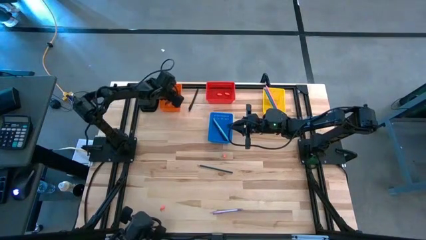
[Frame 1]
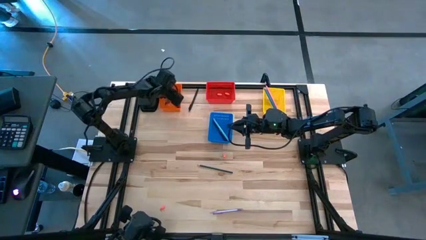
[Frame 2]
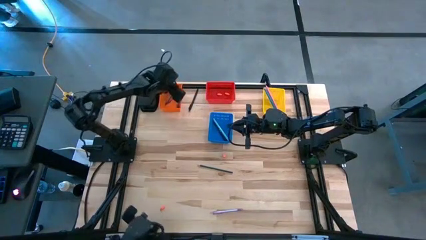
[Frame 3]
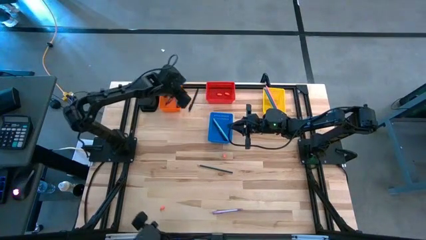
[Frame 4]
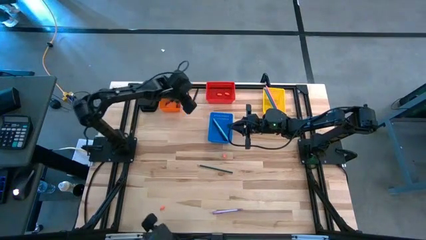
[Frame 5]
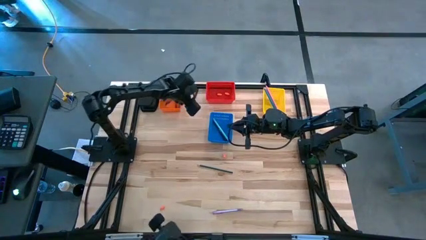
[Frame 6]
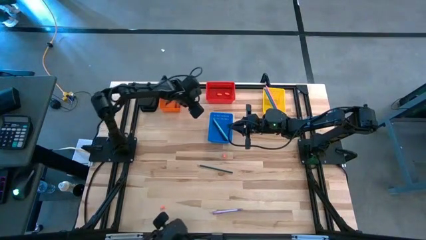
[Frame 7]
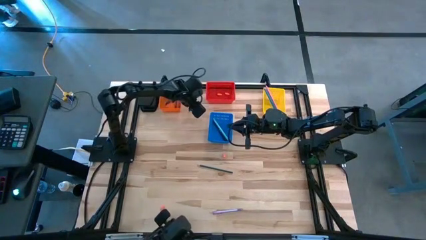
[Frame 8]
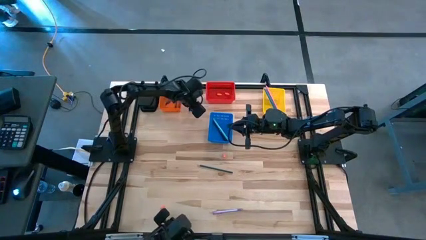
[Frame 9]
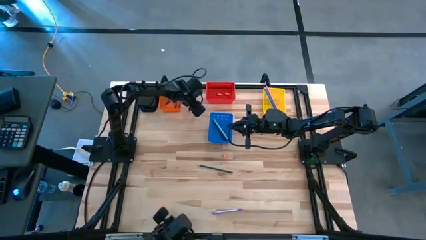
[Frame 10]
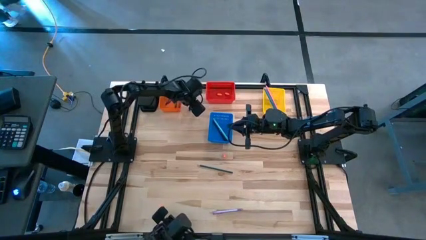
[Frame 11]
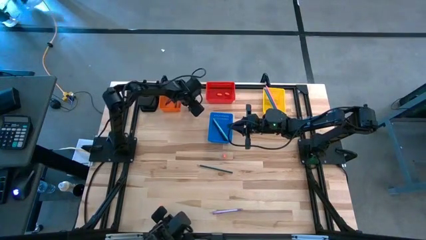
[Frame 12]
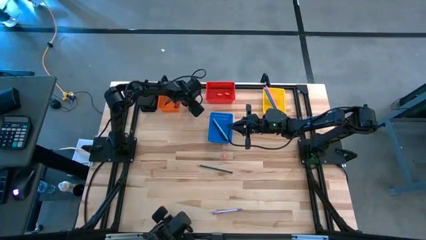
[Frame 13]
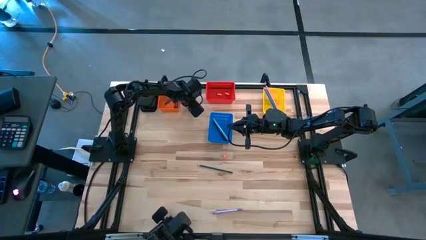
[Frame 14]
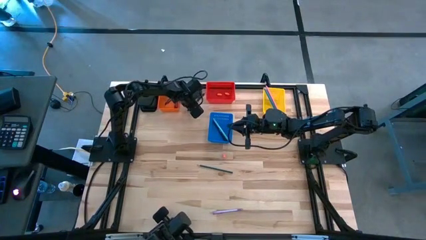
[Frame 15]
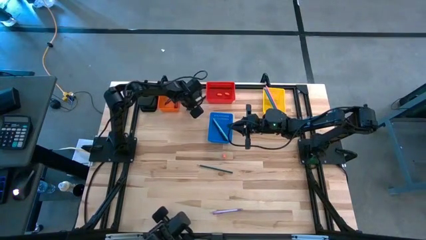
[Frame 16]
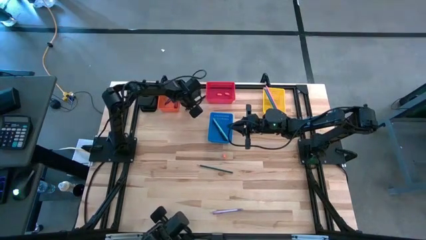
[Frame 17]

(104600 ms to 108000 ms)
Task: Sort crayons/erasers/pens/pencils in bins
Put the black pen into the blue bin

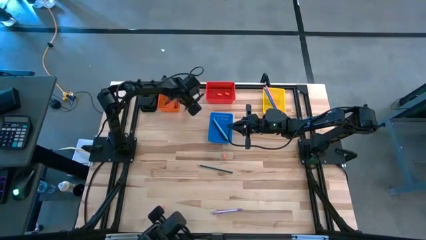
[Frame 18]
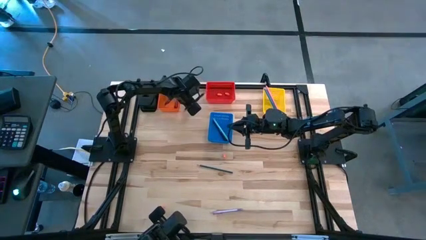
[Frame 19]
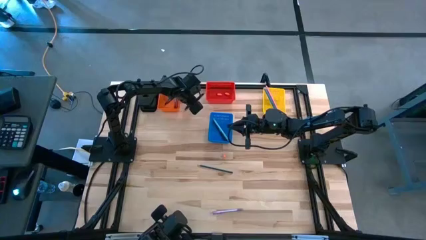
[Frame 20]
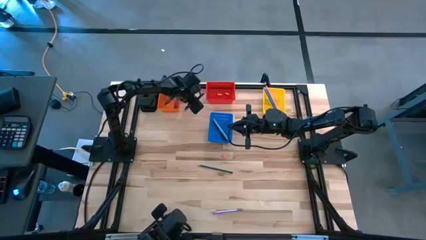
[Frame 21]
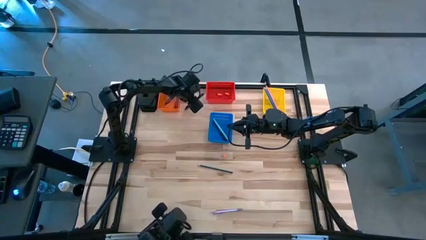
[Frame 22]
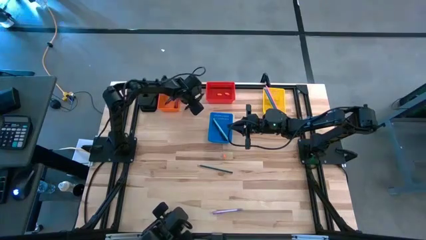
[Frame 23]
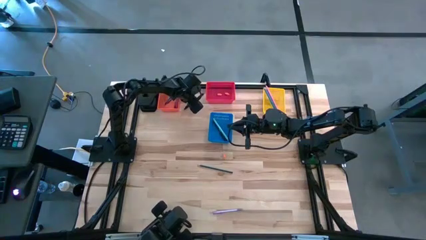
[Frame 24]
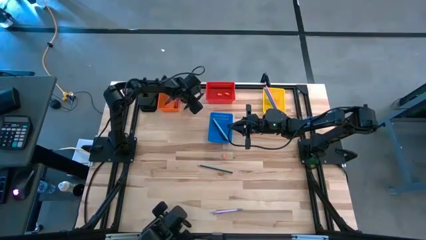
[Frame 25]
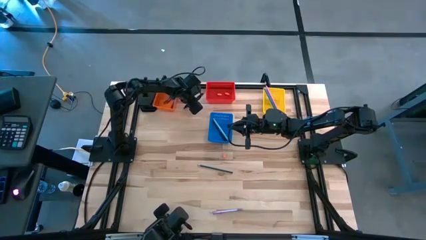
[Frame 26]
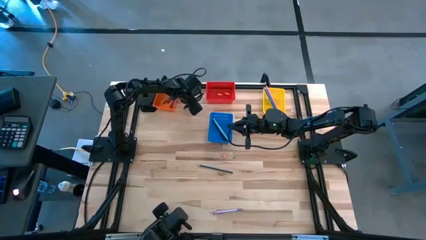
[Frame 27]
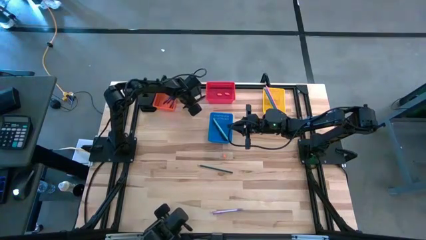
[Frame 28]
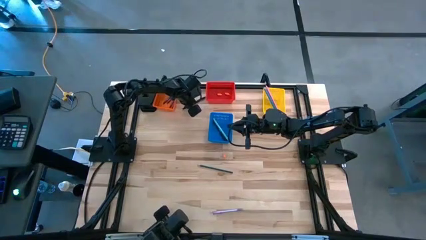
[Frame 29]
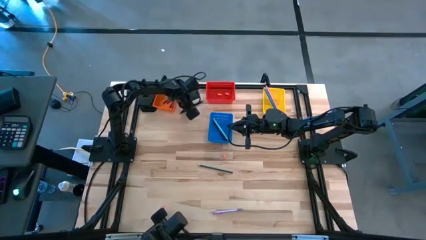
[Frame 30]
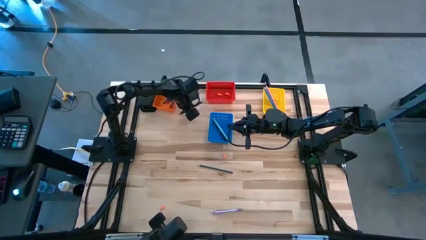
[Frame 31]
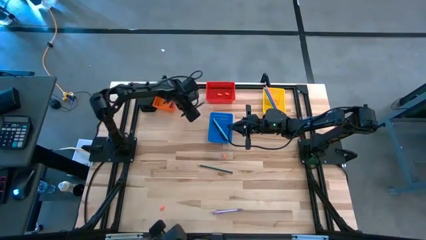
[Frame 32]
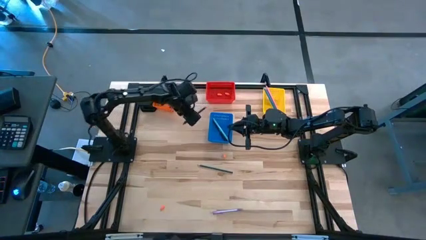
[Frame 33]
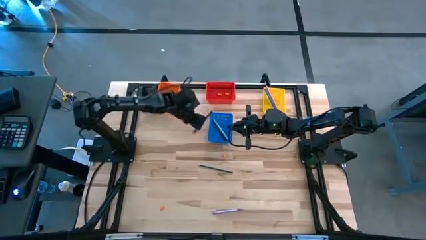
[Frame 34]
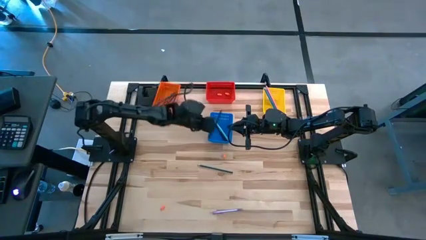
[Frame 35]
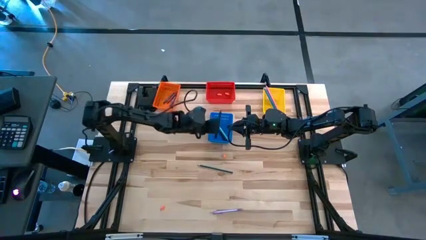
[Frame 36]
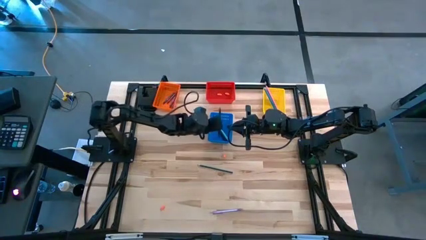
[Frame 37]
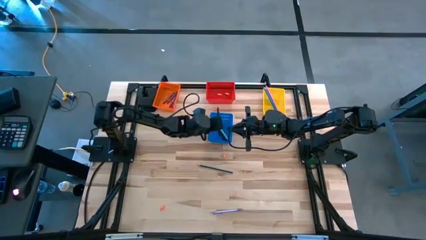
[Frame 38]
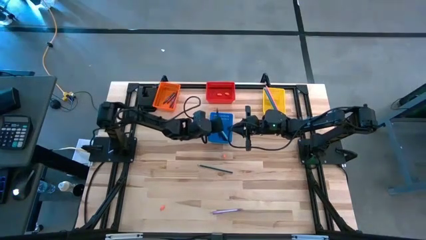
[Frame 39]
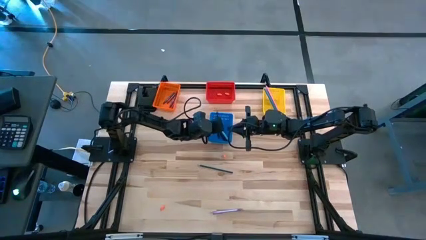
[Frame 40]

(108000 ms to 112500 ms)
Put the black pen into the blue bin

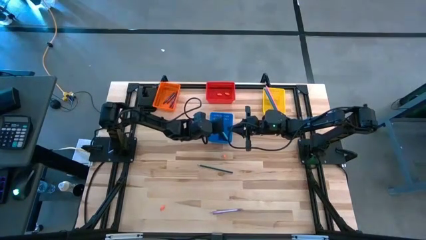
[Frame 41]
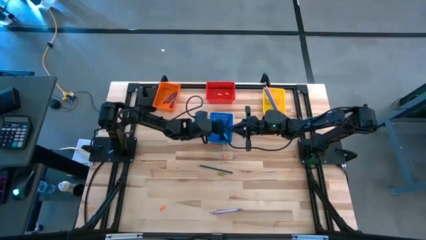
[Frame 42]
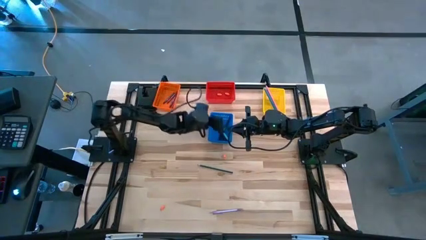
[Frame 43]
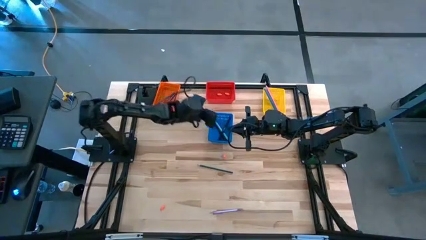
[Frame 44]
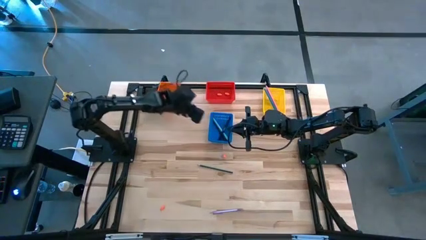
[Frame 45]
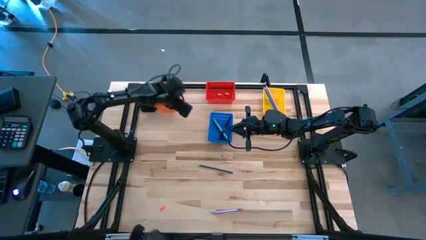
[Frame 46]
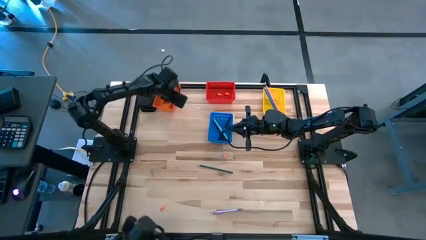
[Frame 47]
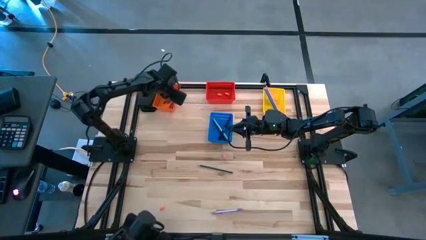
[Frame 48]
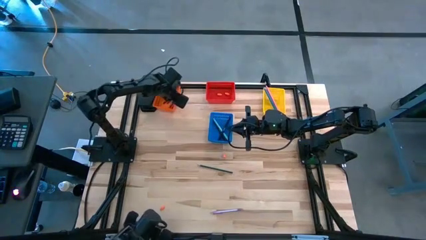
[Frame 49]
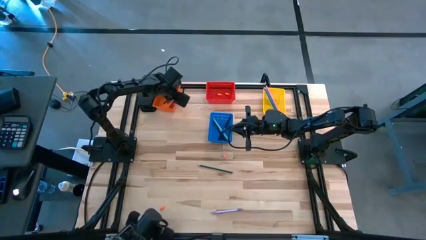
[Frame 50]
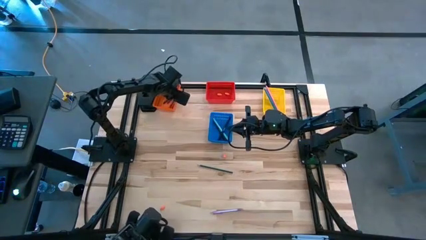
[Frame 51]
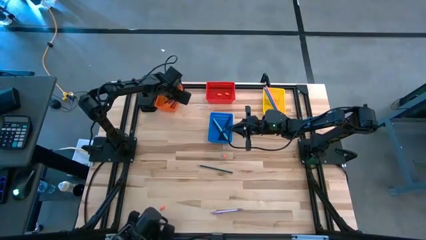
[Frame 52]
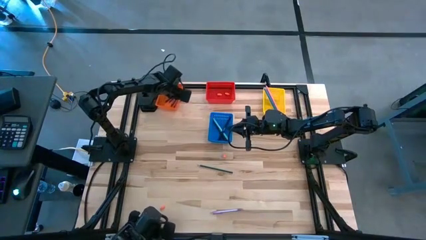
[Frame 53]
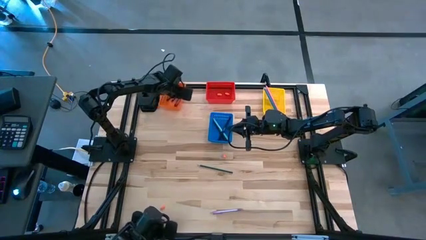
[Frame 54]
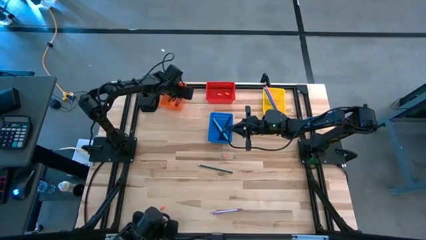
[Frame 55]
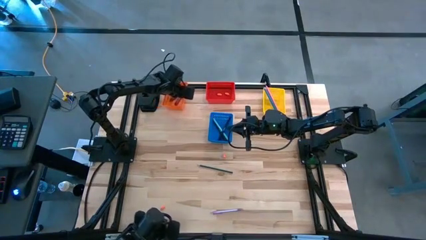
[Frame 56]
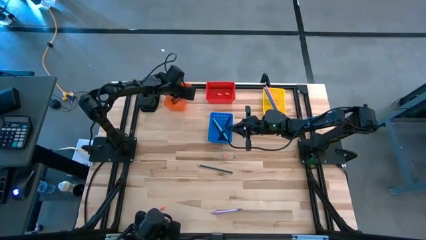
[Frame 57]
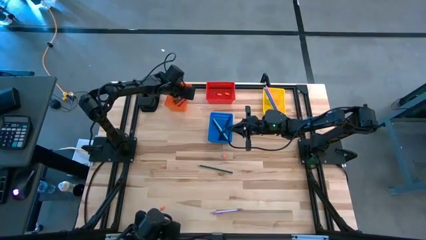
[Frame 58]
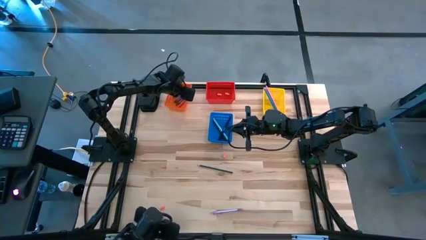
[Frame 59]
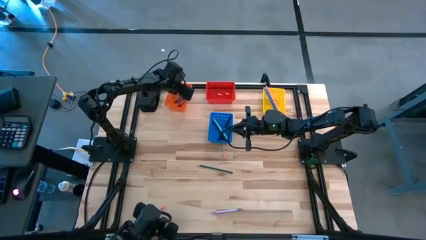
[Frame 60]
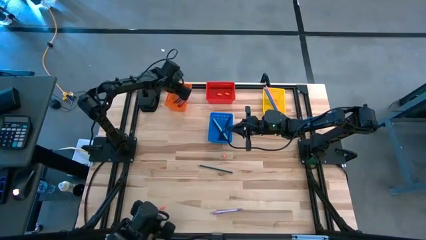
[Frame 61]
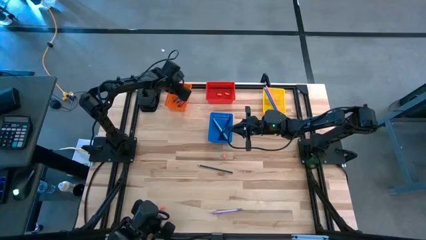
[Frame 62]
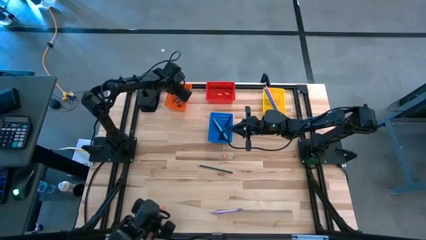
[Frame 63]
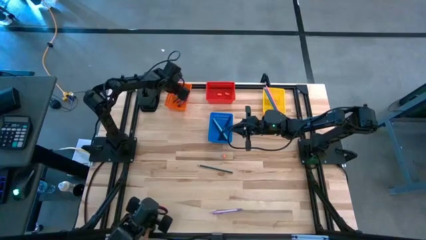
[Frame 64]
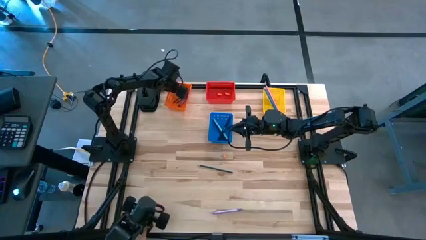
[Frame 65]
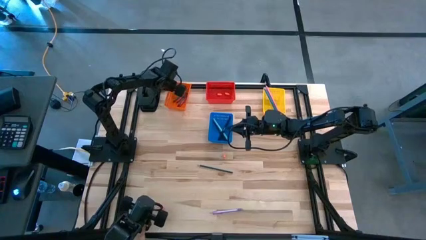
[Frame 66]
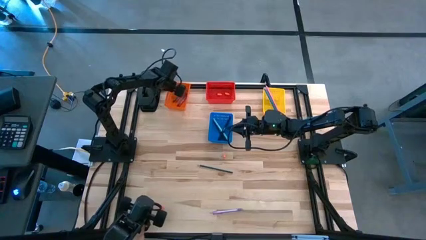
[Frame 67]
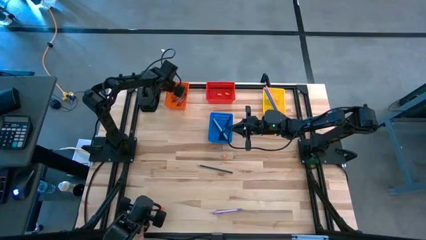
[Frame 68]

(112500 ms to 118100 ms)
Adjust the orange bin

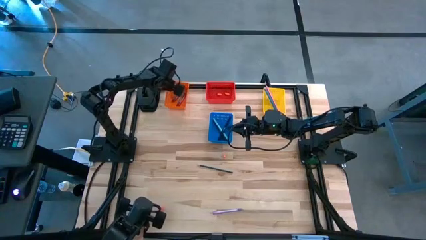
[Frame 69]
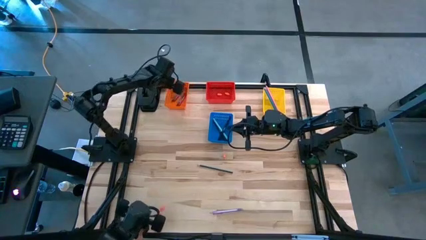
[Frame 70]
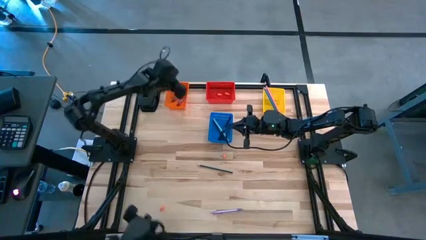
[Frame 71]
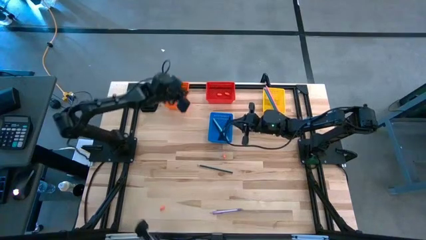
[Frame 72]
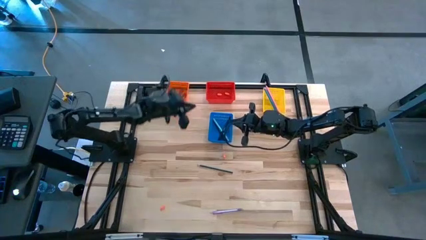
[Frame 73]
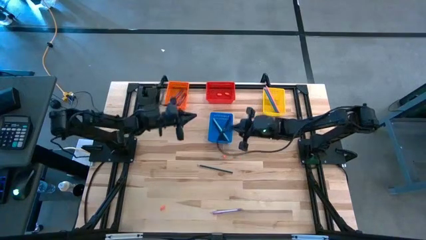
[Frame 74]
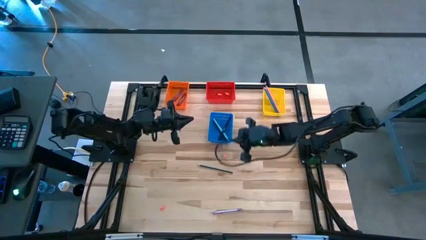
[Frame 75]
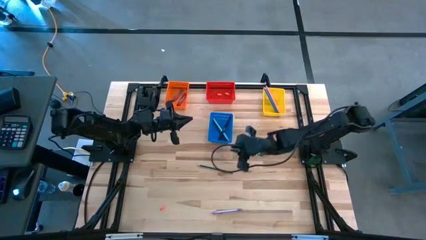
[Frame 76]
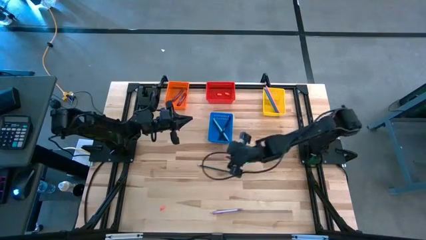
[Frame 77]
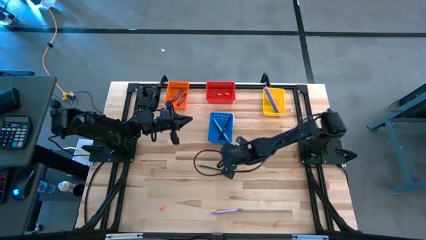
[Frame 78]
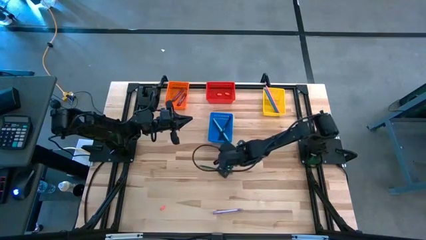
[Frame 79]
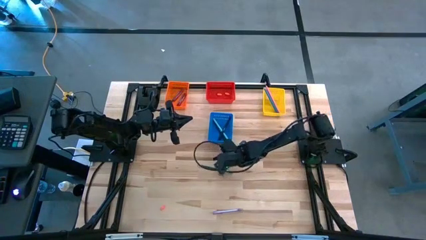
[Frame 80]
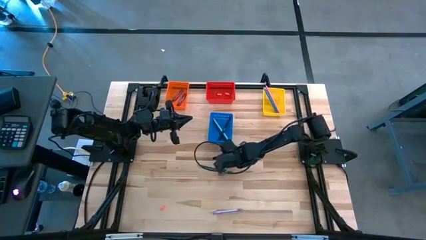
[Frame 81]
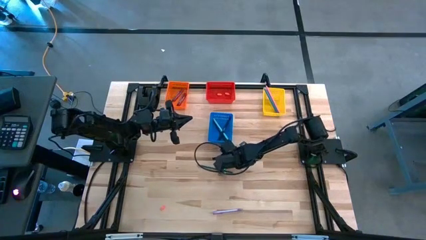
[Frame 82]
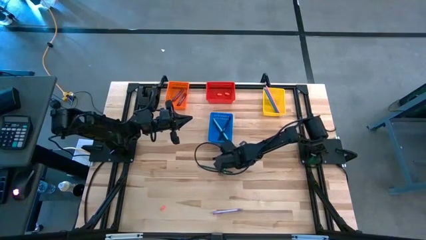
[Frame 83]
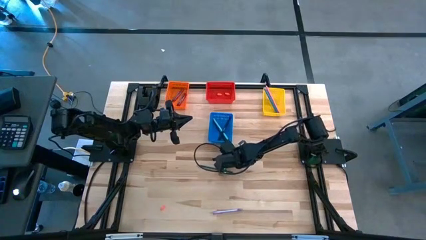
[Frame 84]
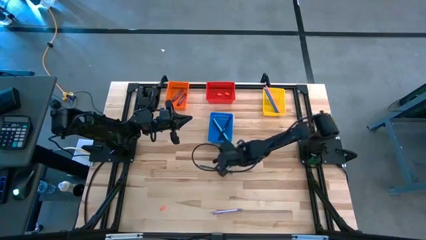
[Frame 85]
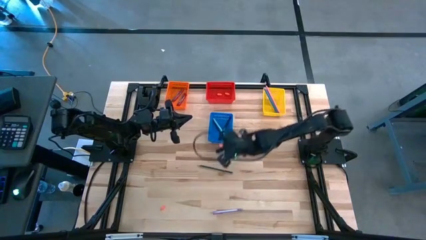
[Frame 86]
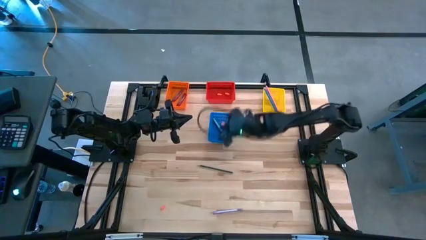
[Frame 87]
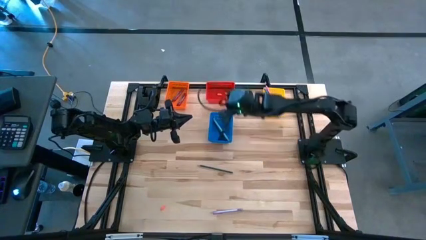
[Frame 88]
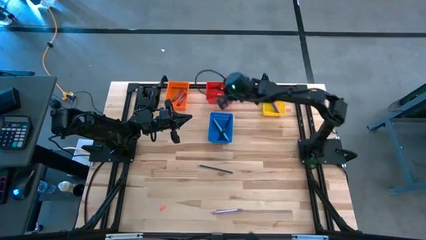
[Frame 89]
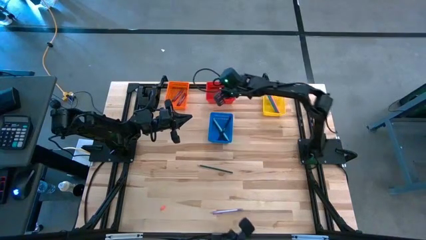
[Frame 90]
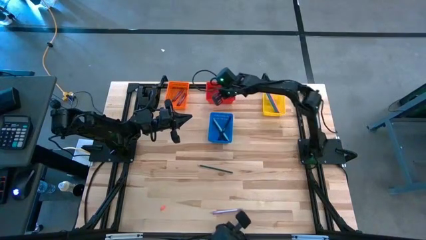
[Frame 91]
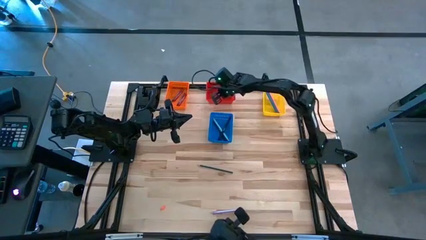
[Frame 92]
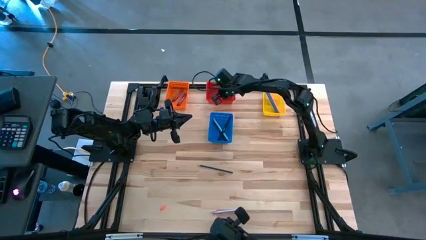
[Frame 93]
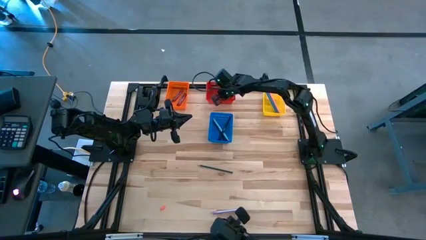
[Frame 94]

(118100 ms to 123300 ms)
Put the orange eraser into the red bin
